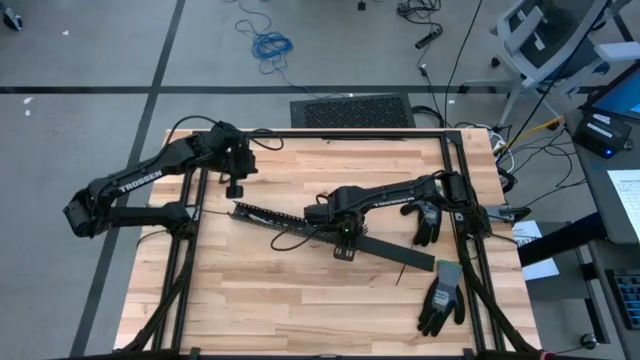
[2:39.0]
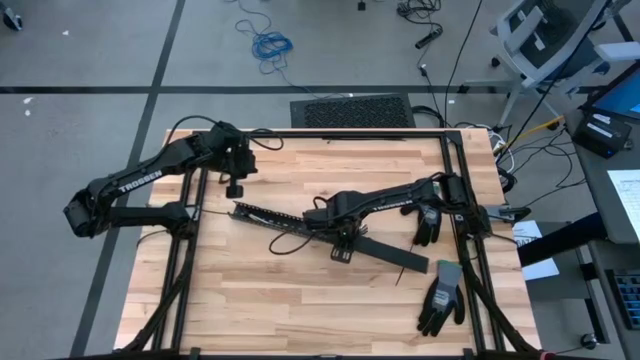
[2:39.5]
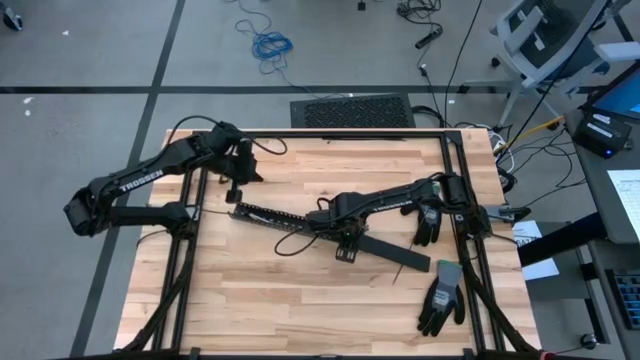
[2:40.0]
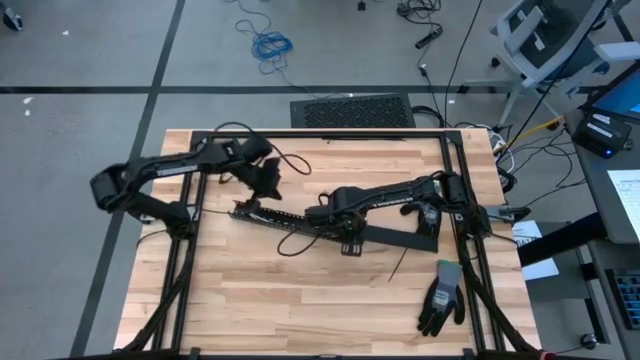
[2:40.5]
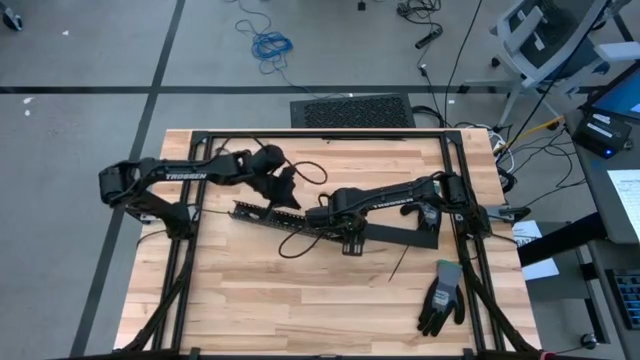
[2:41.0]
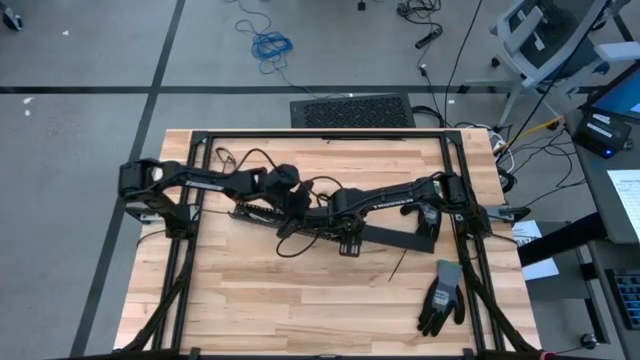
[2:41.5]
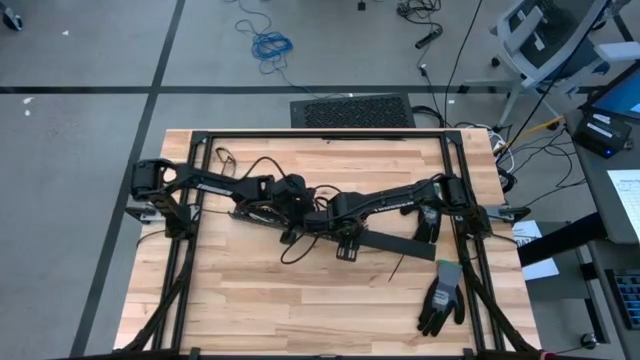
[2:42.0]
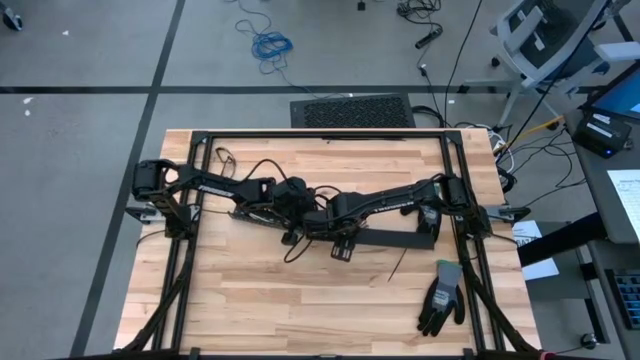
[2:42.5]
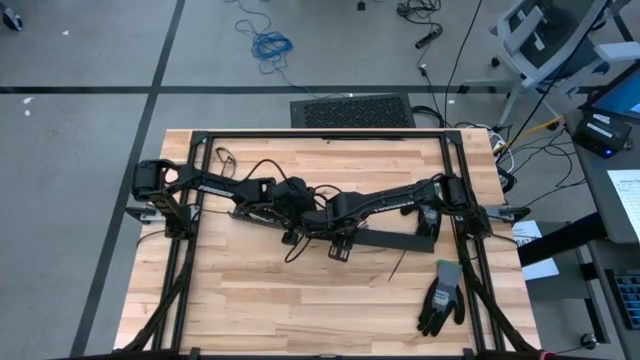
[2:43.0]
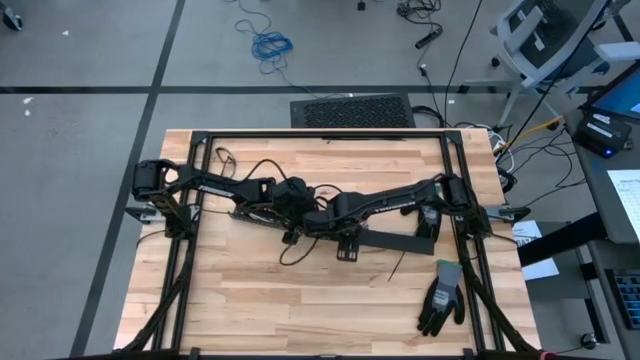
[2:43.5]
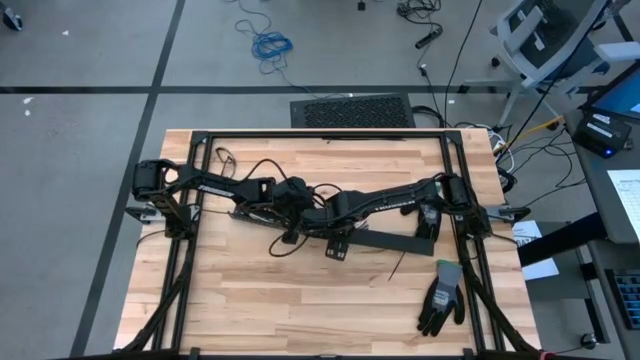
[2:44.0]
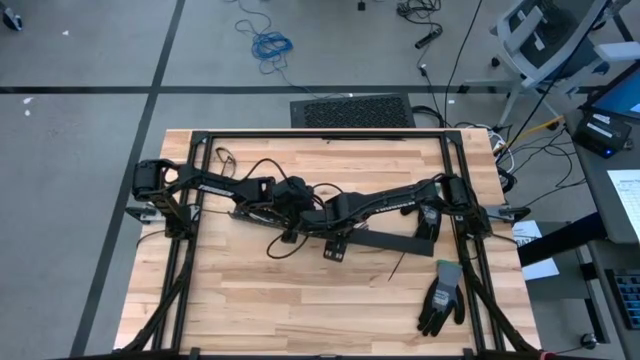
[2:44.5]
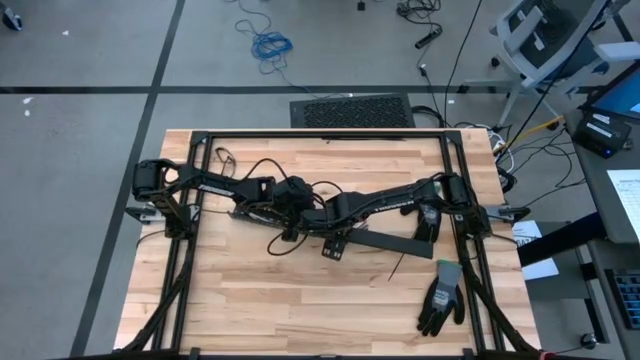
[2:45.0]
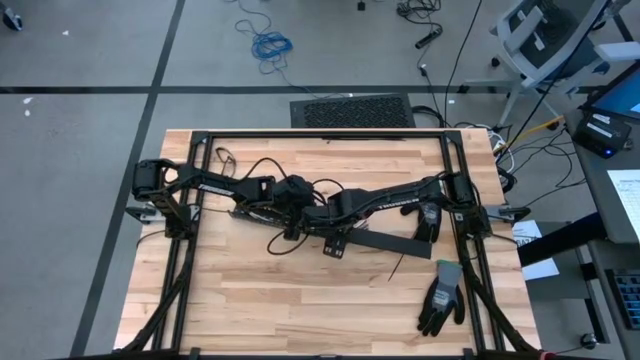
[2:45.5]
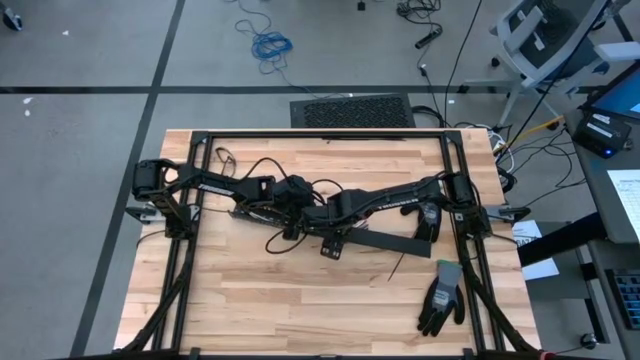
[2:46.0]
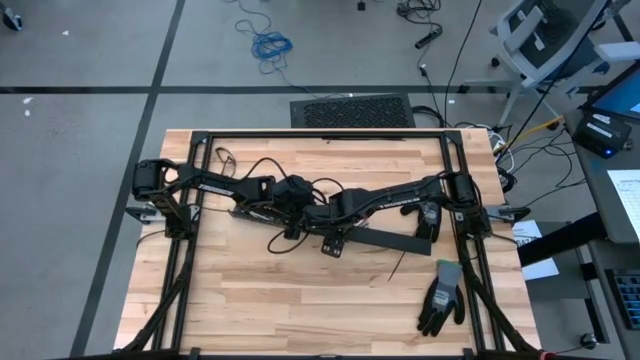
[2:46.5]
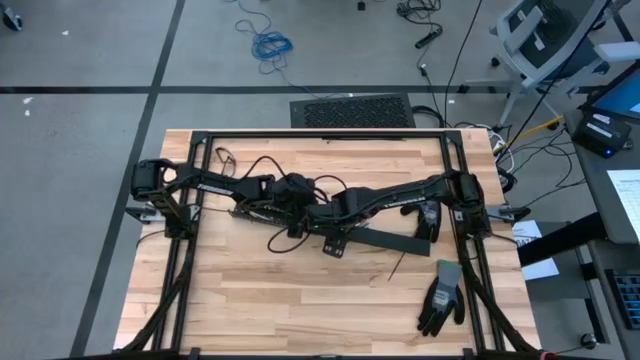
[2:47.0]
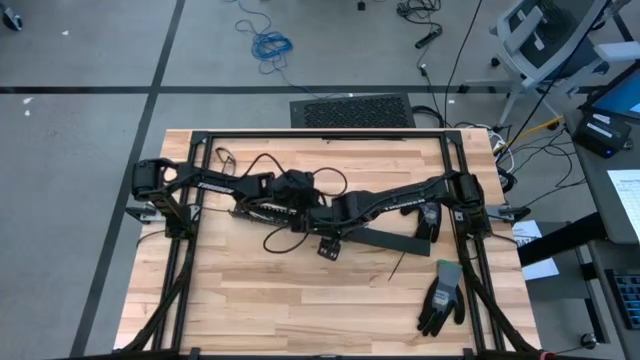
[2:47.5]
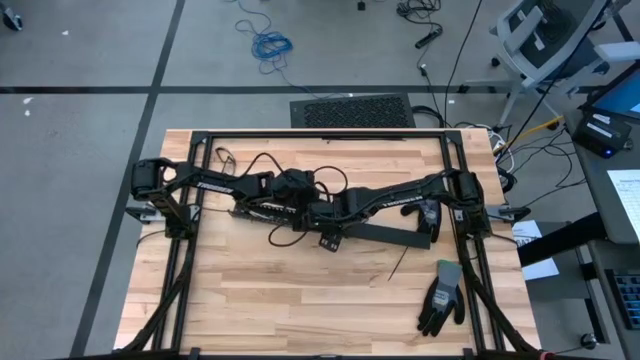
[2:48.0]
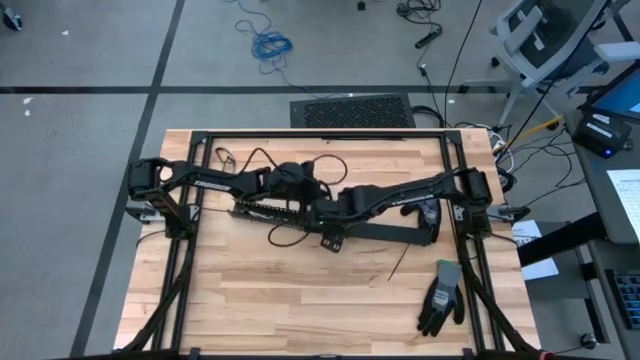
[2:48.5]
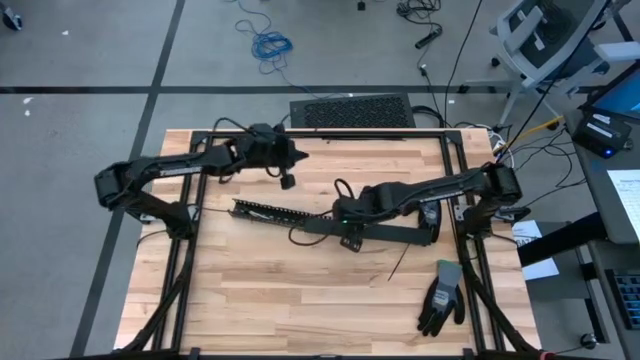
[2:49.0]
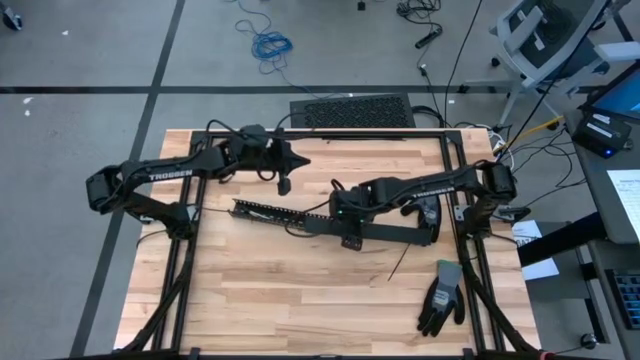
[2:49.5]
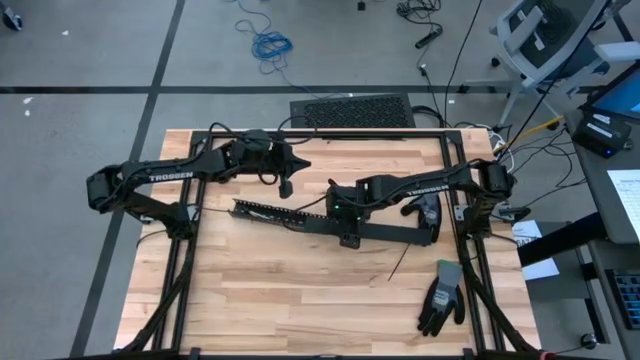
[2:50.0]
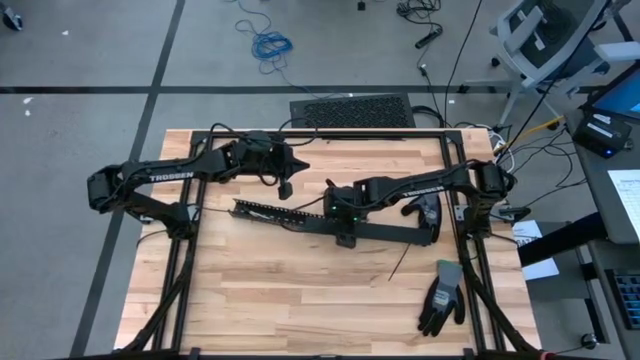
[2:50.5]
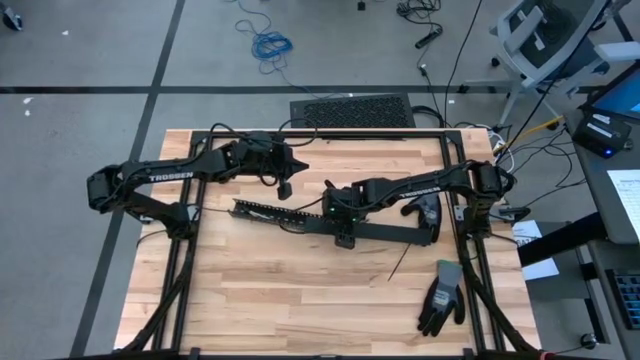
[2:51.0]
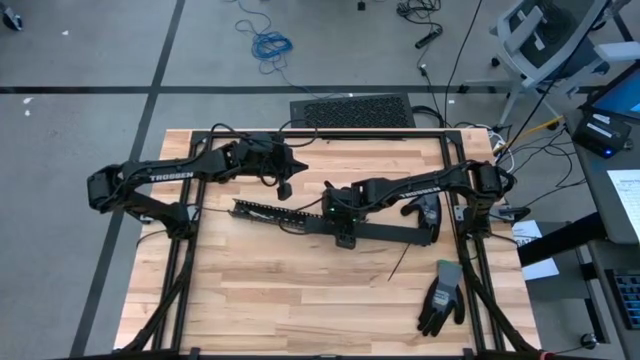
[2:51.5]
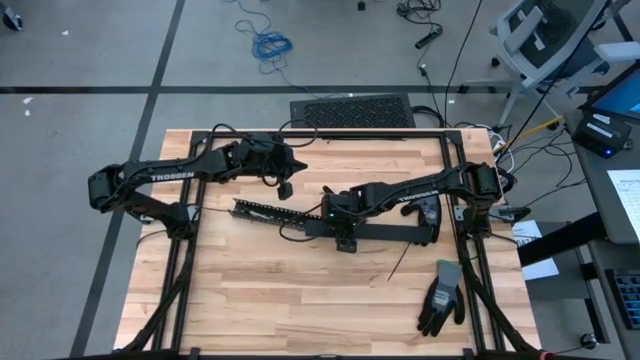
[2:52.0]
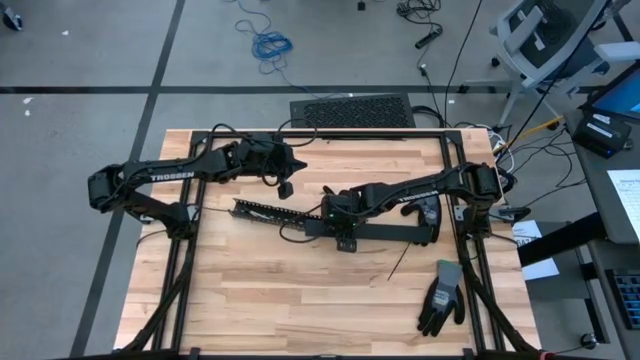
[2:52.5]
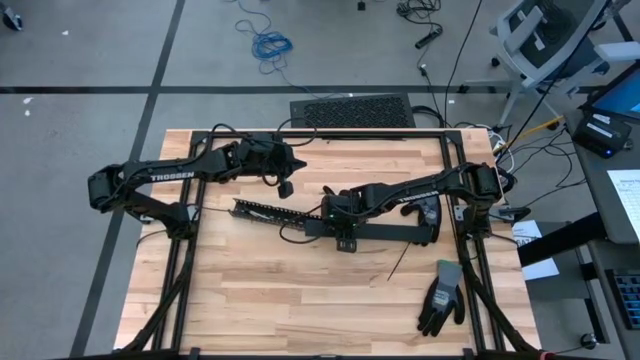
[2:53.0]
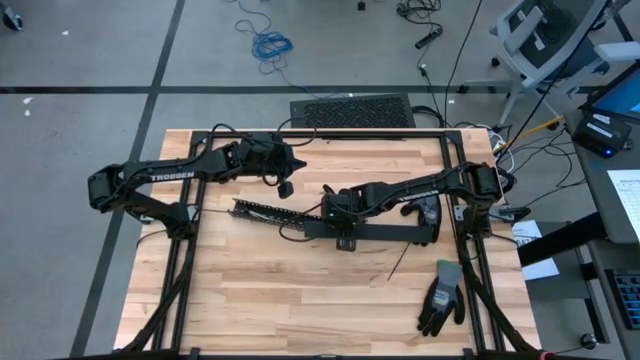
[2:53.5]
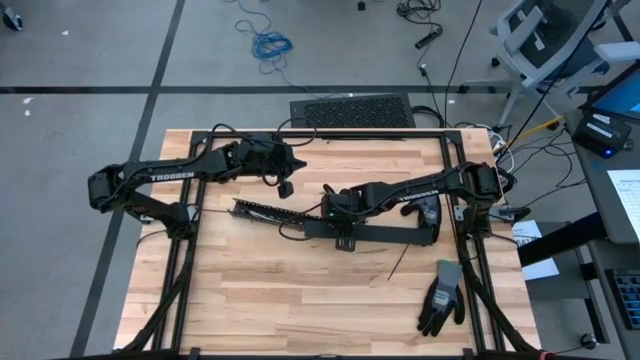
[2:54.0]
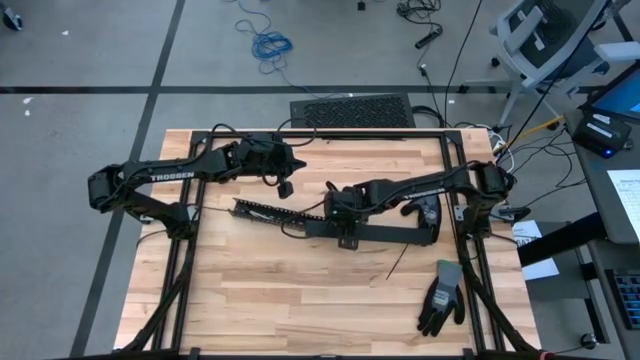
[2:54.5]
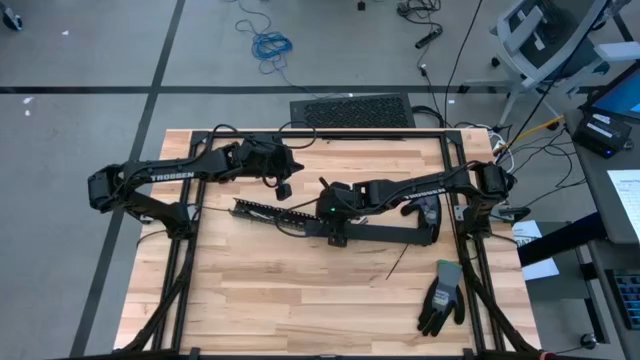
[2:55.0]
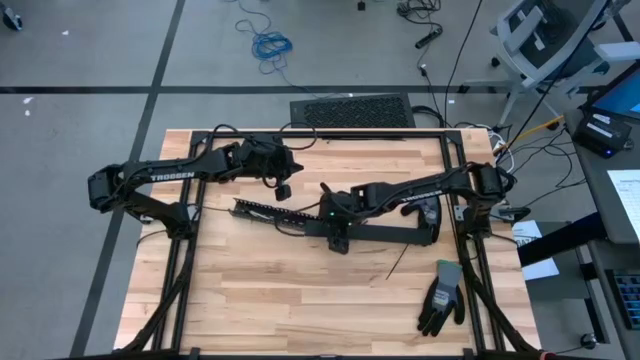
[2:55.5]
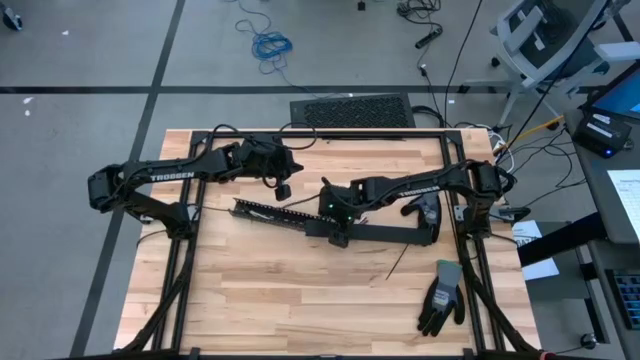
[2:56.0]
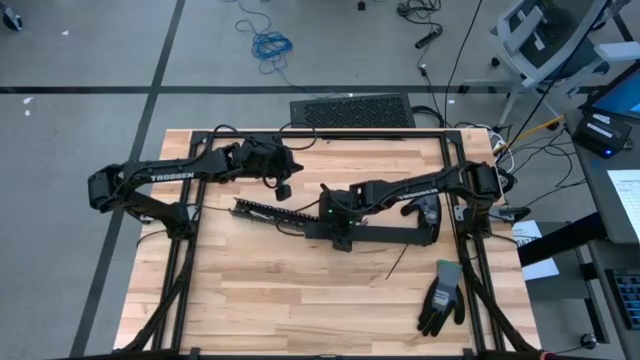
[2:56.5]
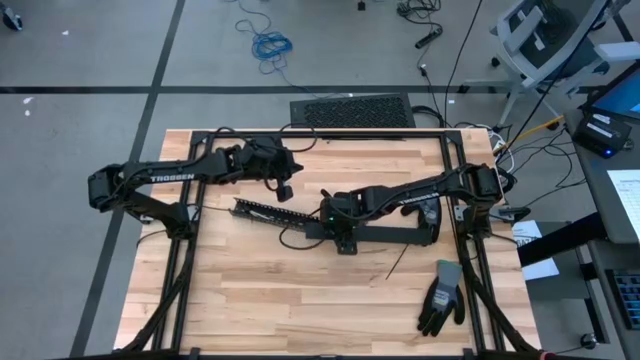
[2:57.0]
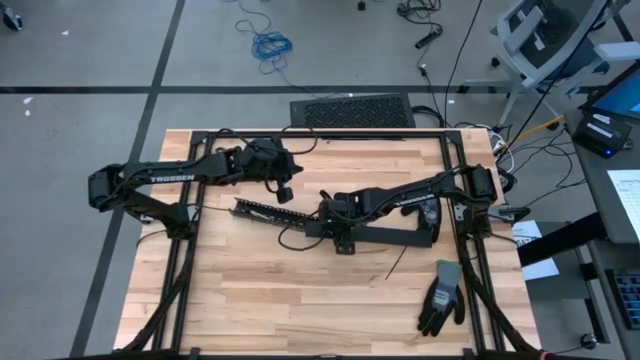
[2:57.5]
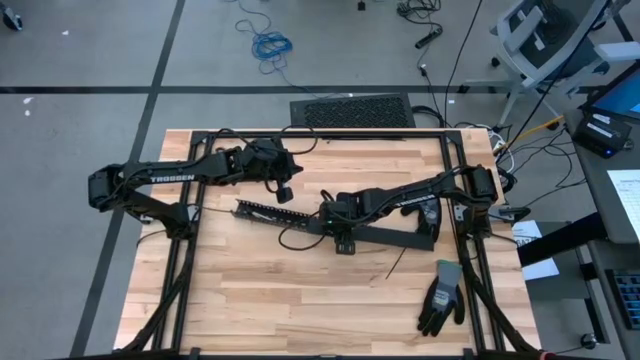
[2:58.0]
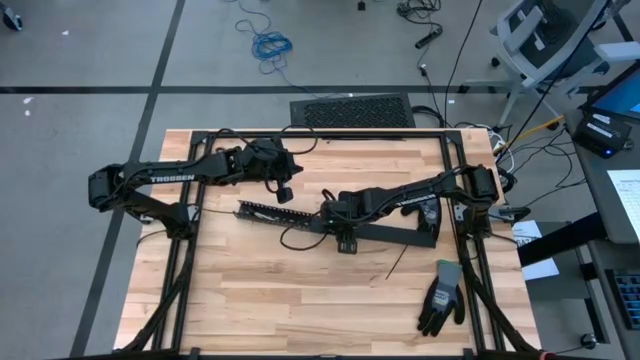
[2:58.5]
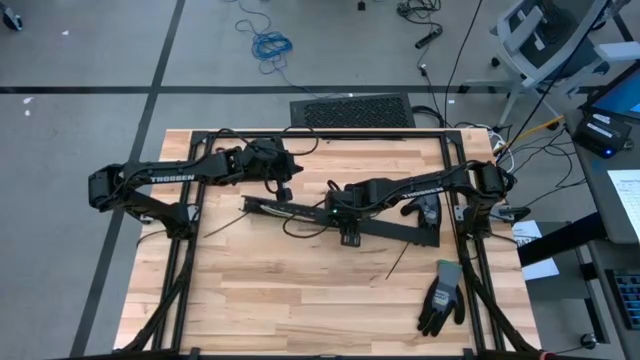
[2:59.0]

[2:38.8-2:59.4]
Task: Ziptie cables
Close the black cable duct cover

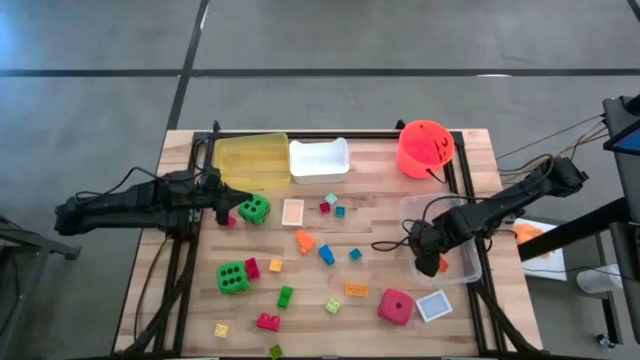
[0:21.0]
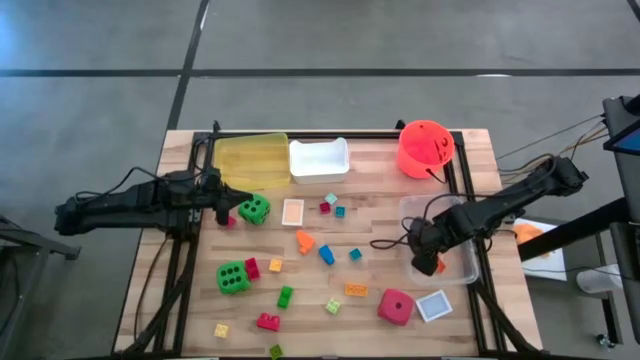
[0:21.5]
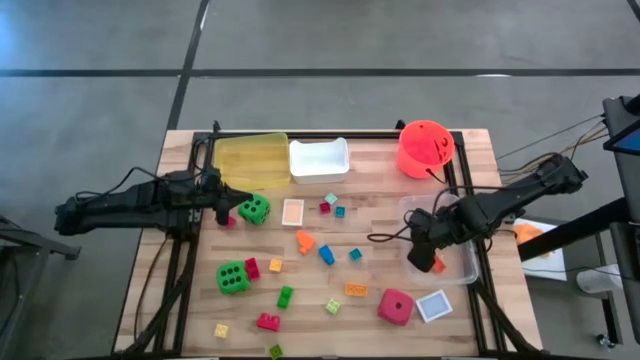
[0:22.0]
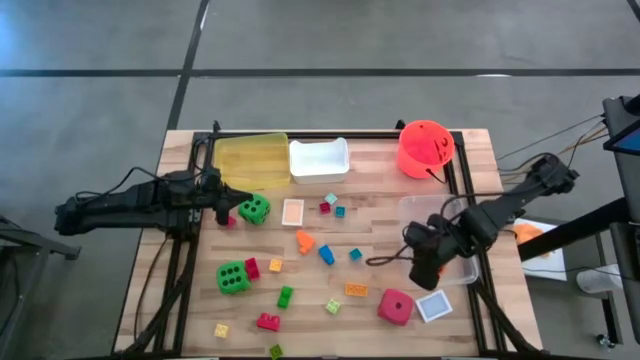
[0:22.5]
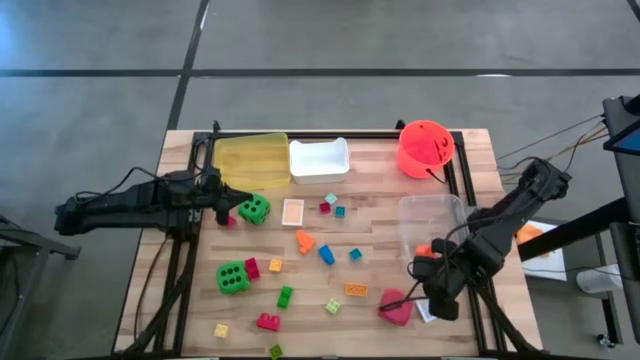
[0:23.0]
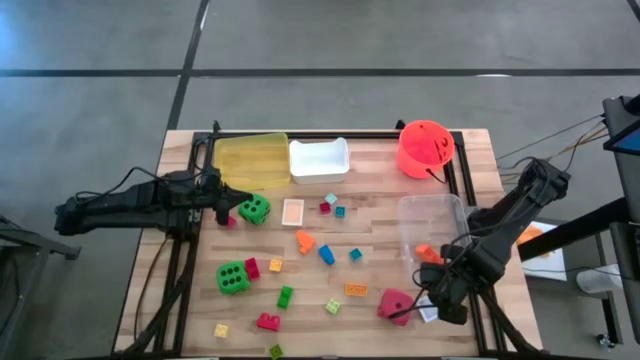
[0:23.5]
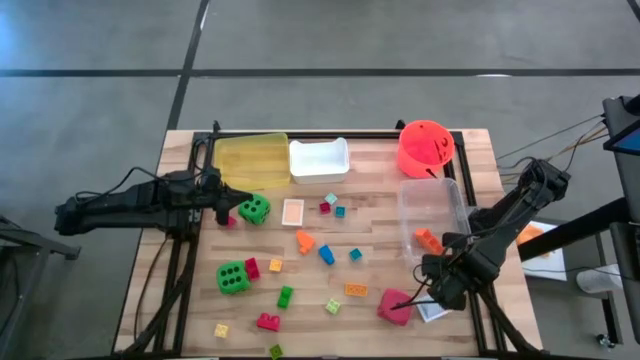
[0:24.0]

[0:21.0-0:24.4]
Task: Pick & Place Toys
Adjust the transparent bin
